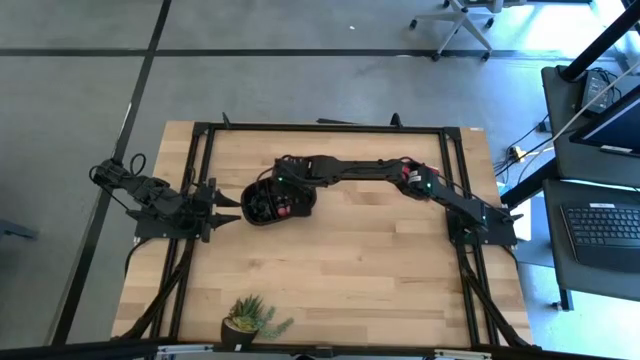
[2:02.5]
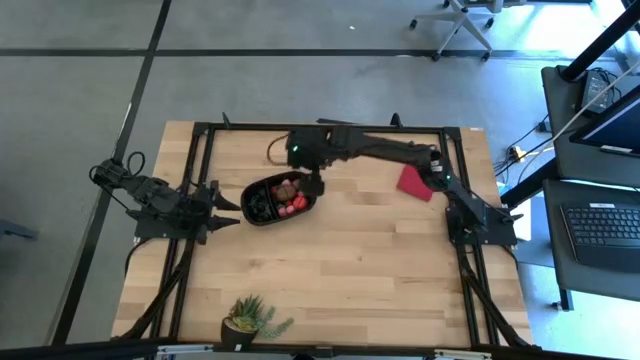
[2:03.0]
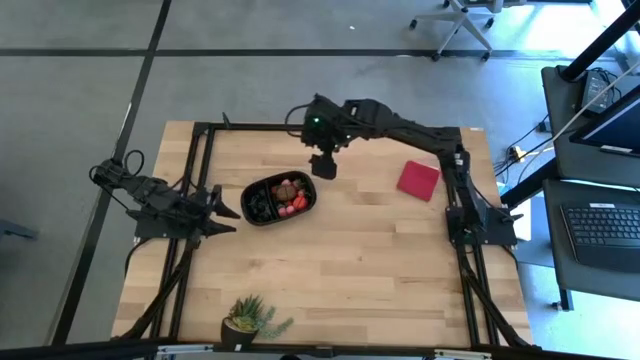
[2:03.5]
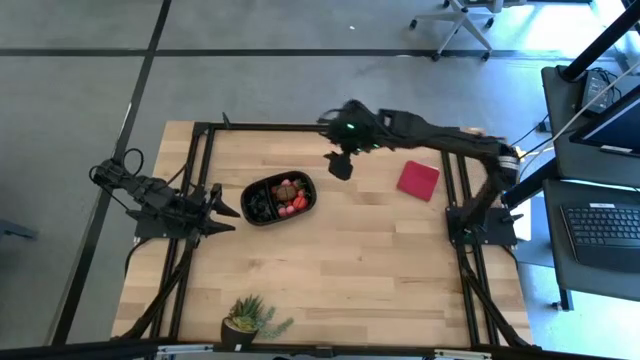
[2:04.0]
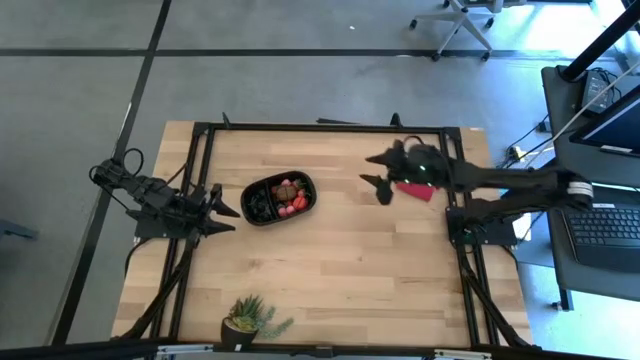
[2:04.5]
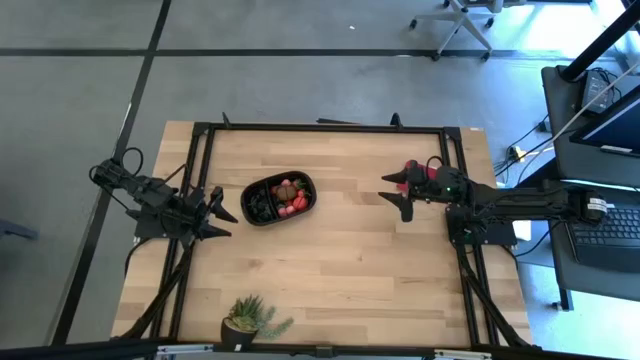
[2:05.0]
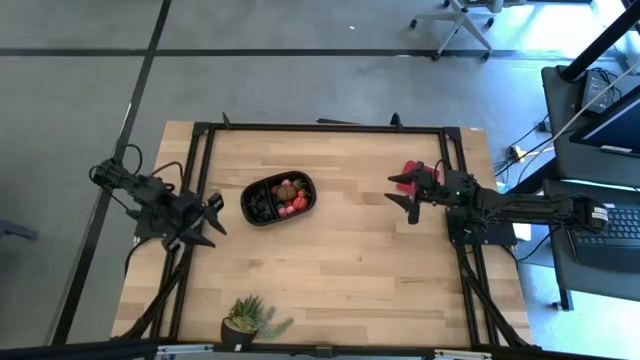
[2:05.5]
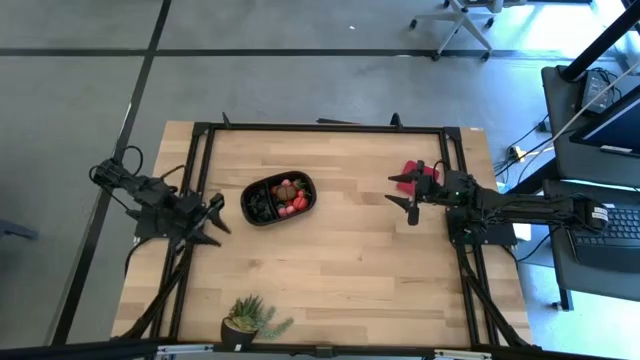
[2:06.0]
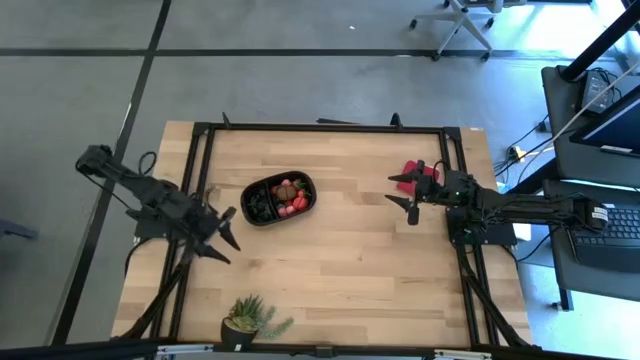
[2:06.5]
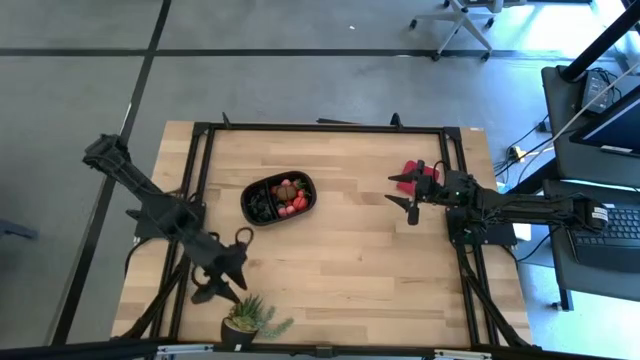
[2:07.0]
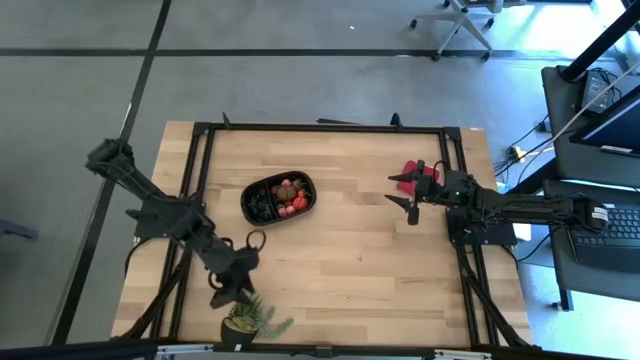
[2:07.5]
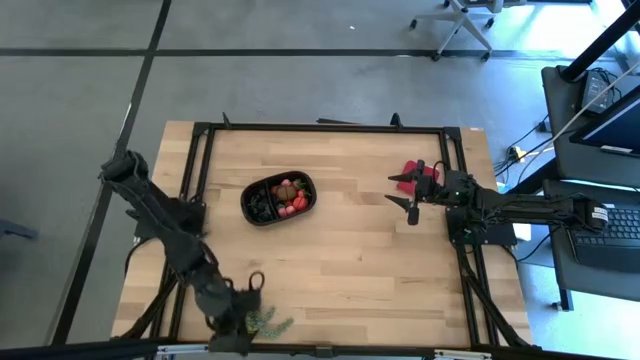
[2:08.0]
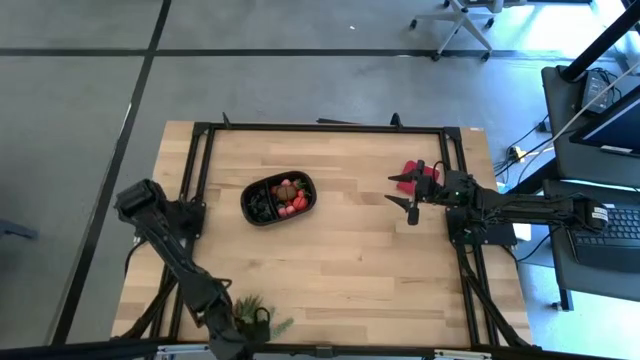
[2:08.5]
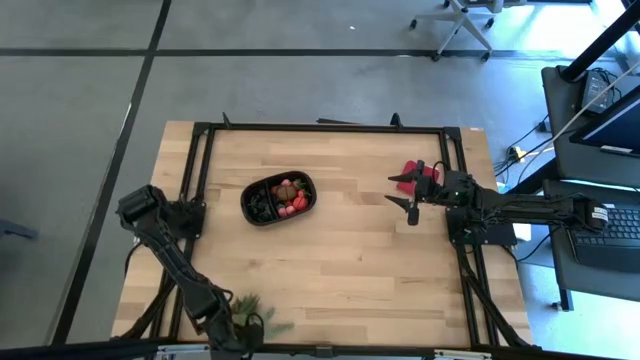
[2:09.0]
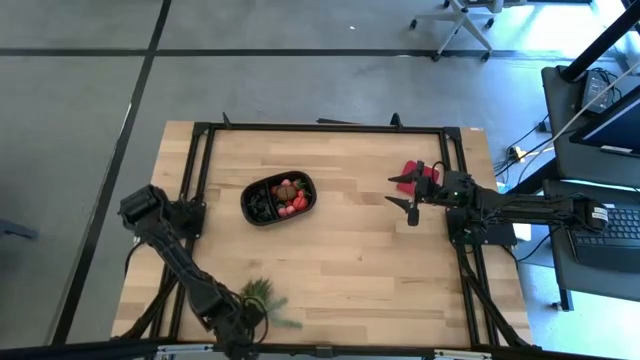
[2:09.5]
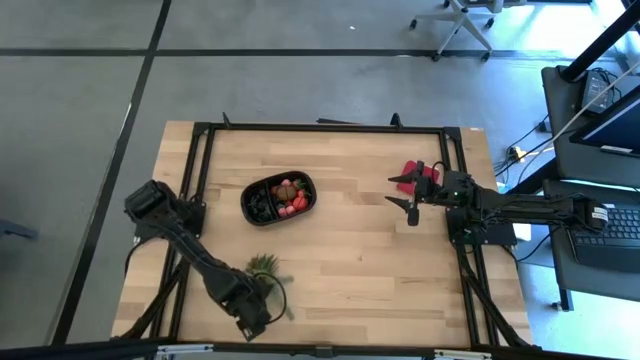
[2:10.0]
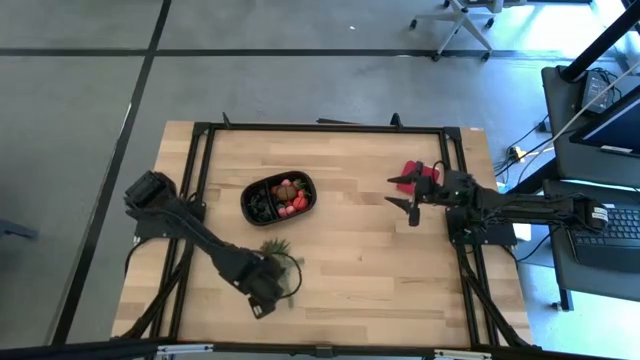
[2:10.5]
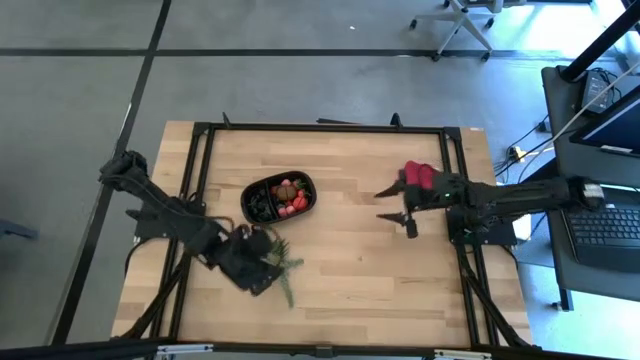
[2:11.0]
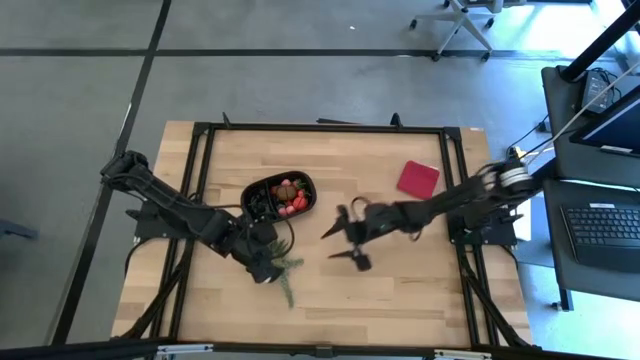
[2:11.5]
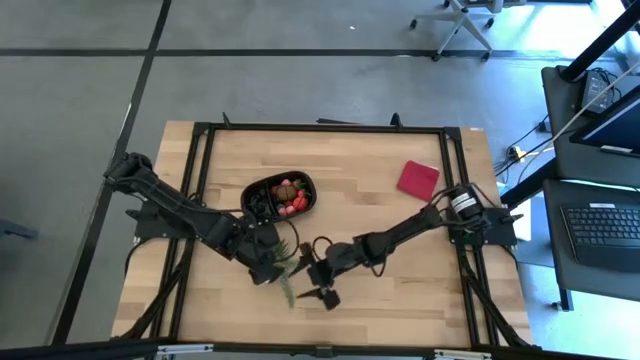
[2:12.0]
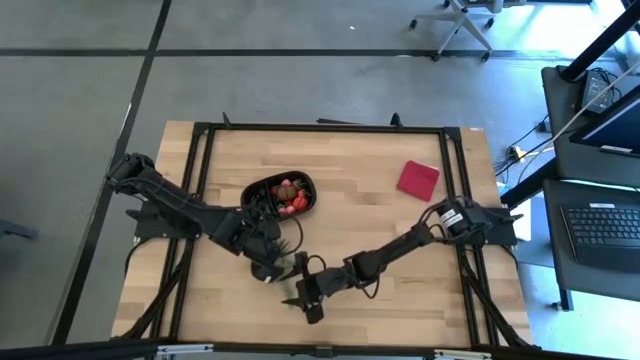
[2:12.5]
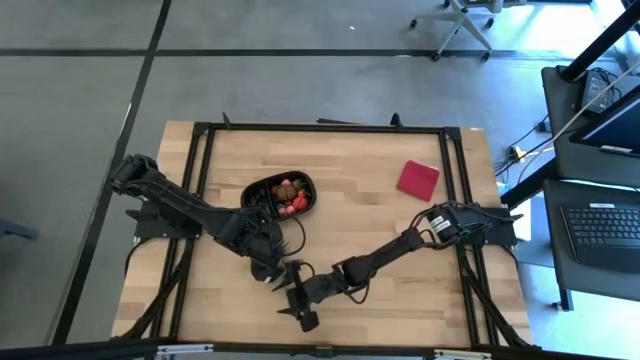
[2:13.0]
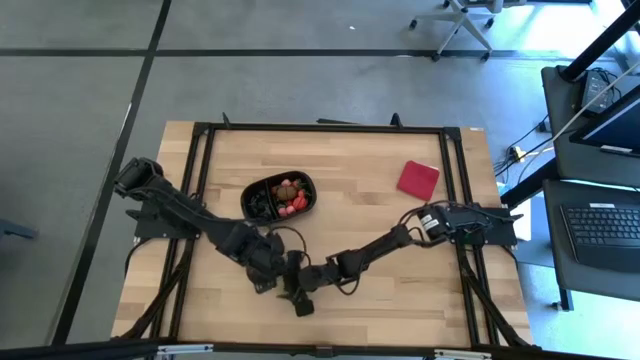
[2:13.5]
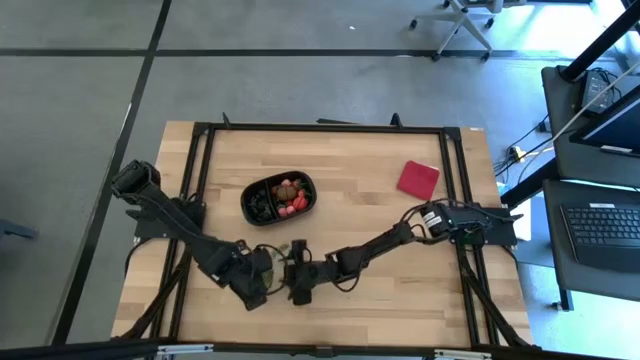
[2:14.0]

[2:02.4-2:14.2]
Task: Pick and placing Produce into tupperware
Adjust the black plotted plants

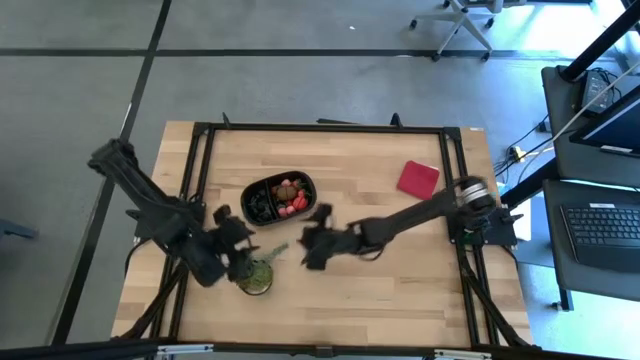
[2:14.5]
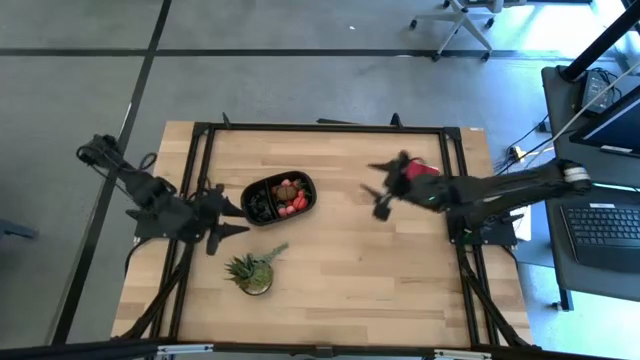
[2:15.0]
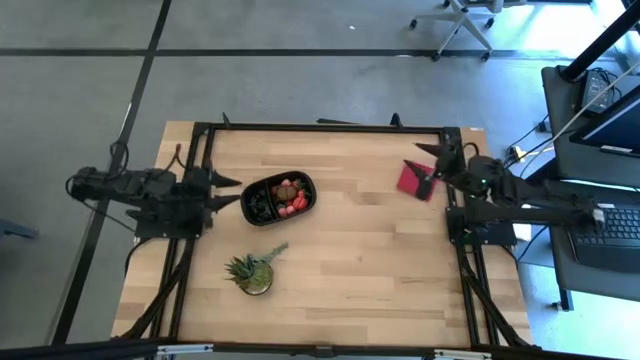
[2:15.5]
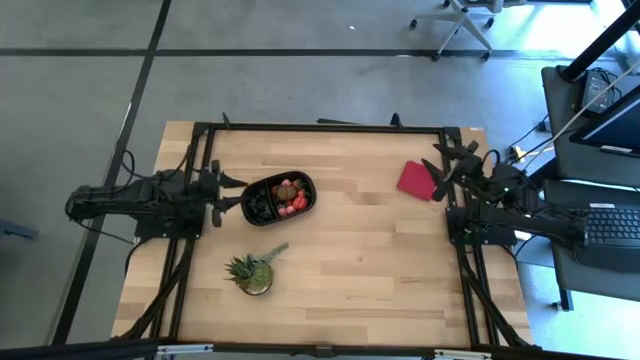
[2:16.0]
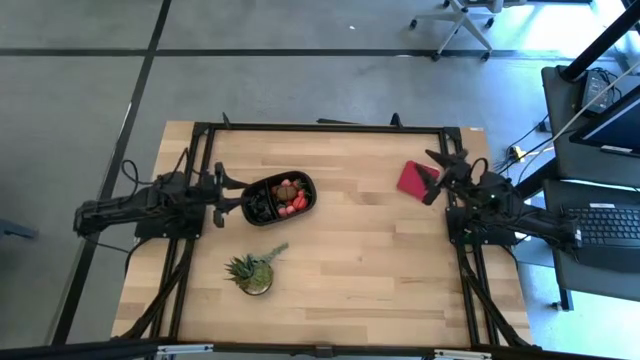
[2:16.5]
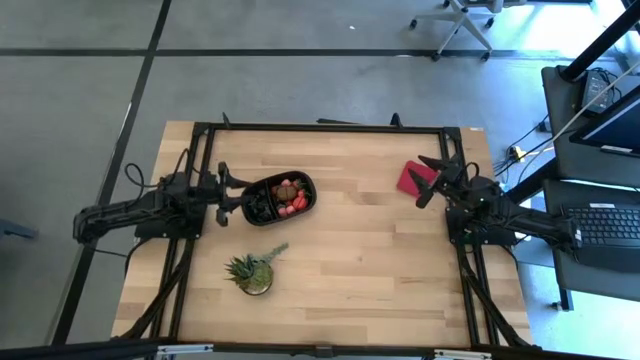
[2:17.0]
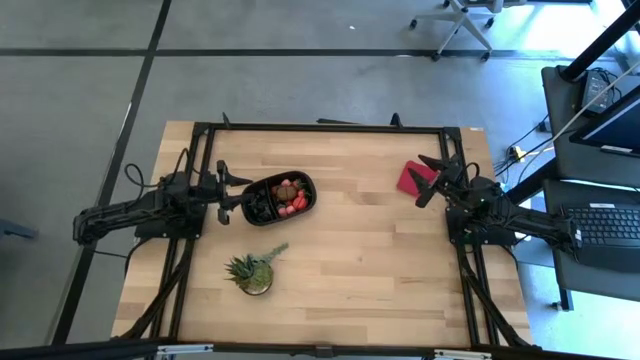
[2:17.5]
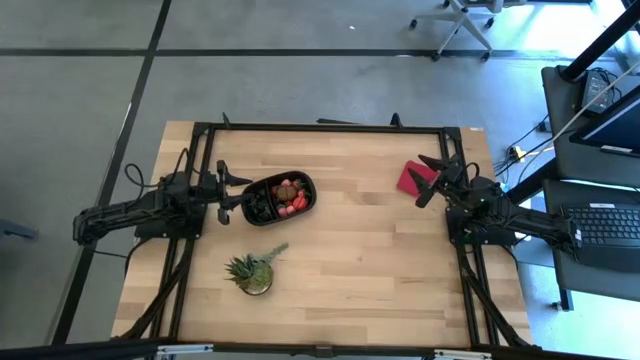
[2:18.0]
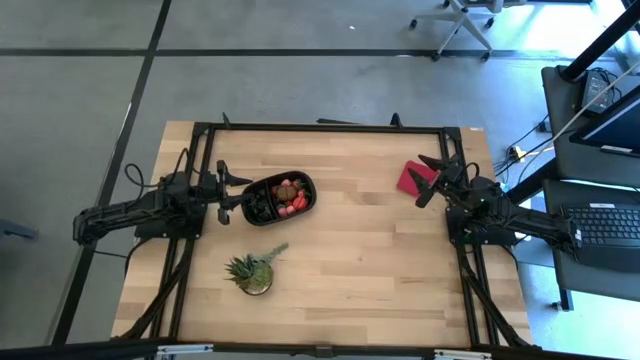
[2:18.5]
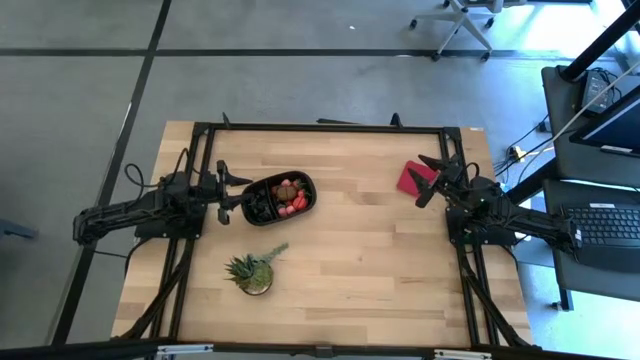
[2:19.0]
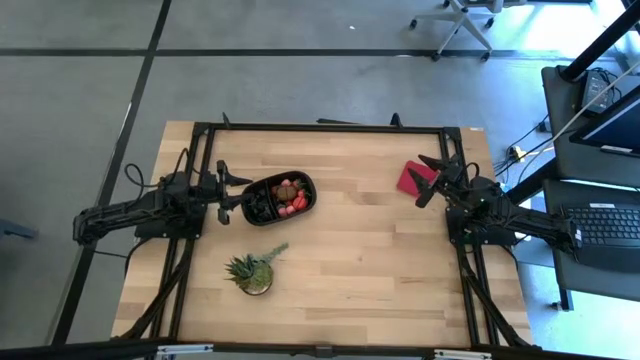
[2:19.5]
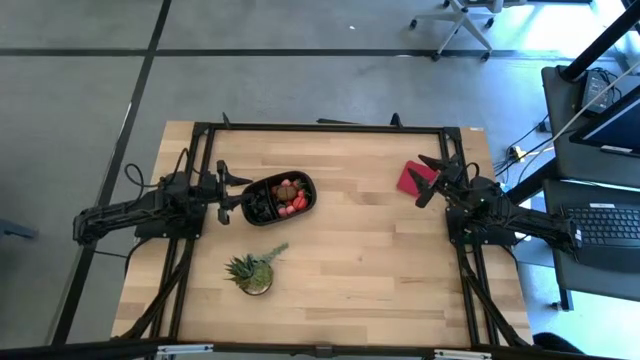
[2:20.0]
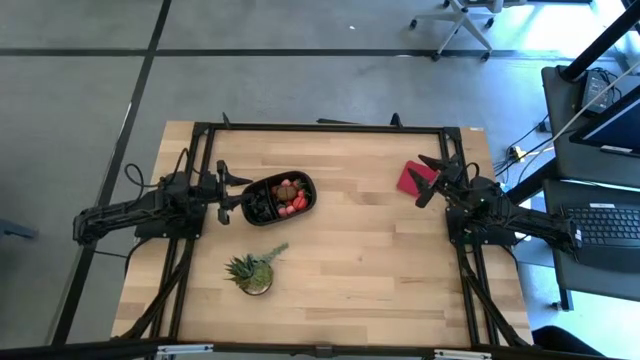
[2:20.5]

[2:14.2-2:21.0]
Return to Home Position

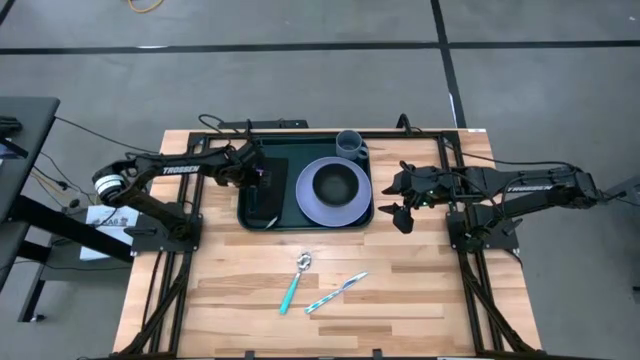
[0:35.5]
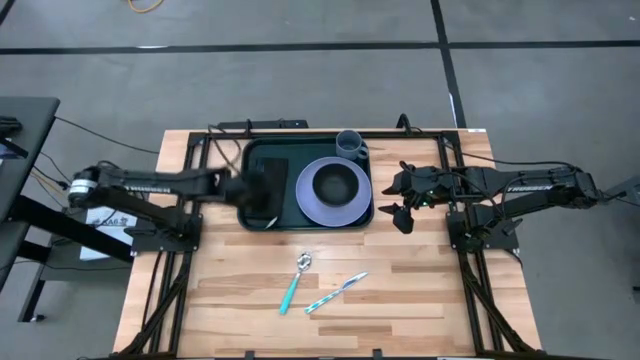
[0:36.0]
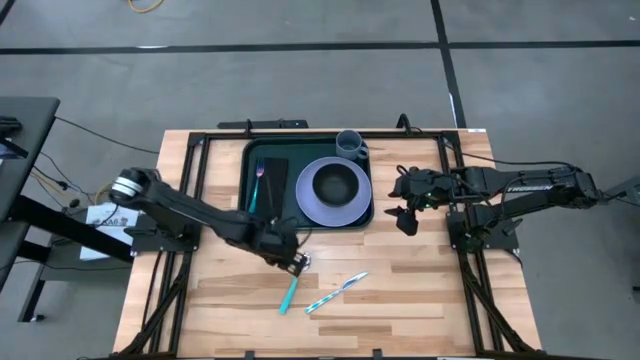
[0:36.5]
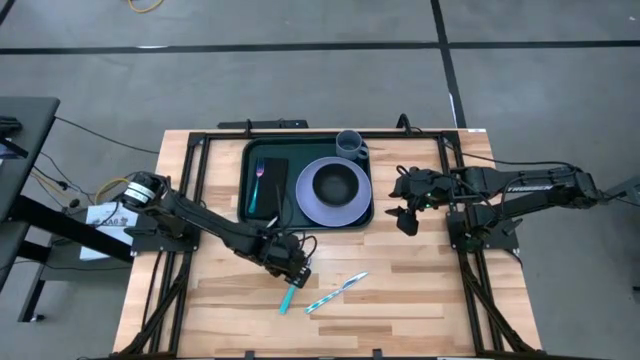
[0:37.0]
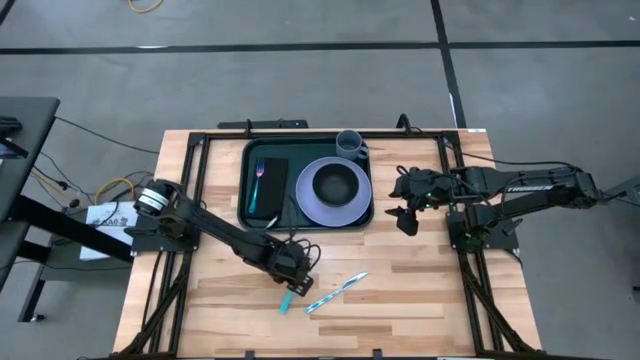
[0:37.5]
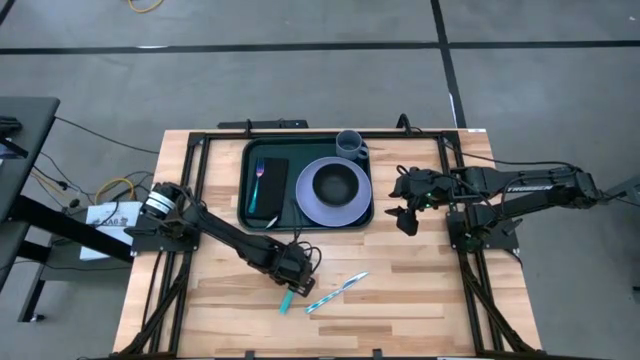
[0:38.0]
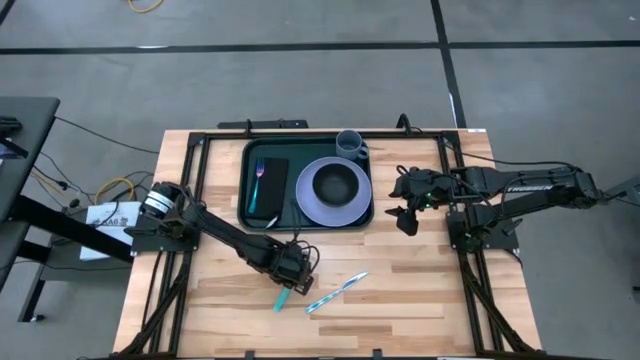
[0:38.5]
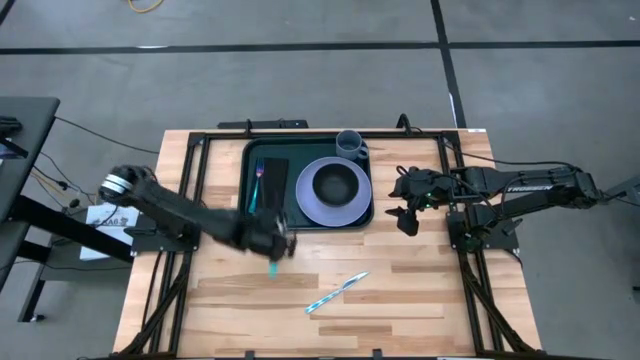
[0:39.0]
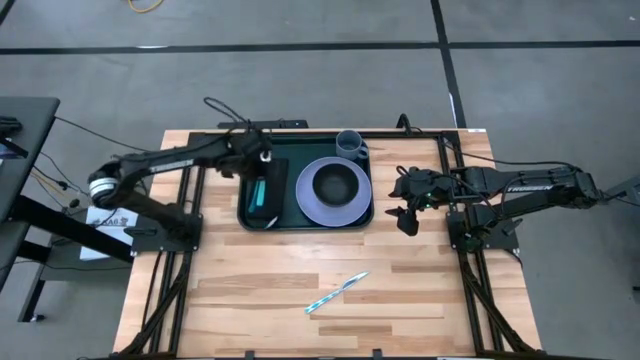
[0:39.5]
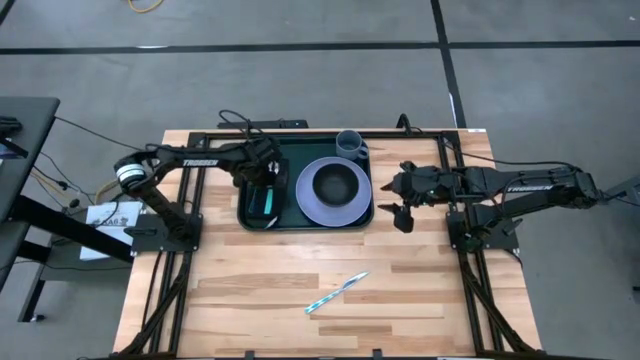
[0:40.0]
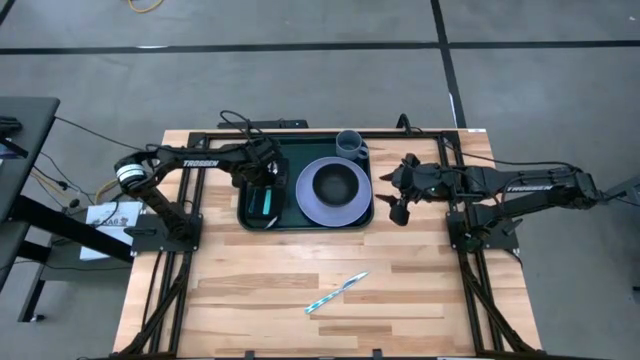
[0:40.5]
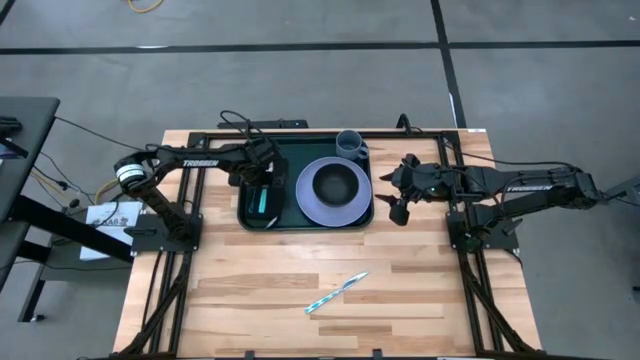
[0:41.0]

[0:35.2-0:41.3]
Task: Set up tray
Put the blue spoon on top of the black napkin to the right of the blue fork
